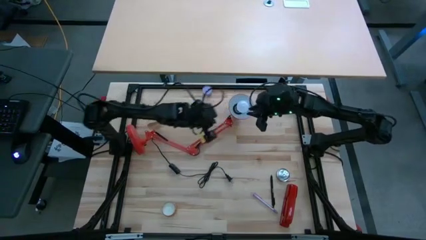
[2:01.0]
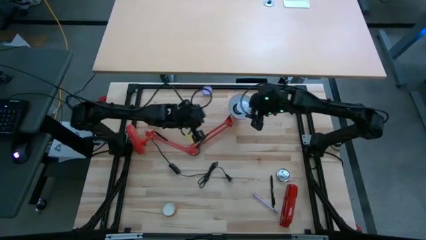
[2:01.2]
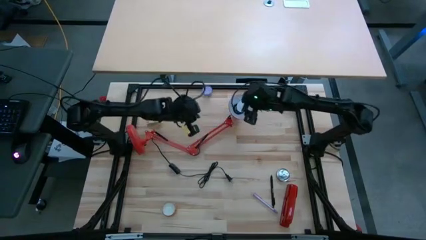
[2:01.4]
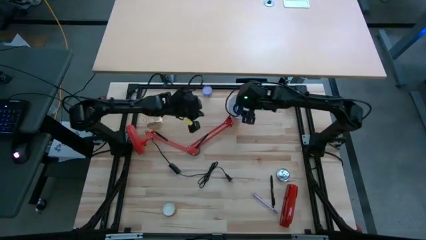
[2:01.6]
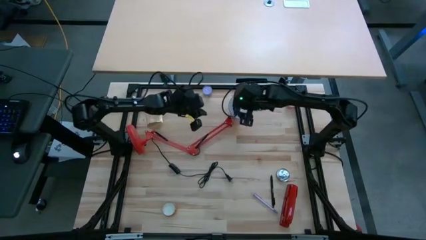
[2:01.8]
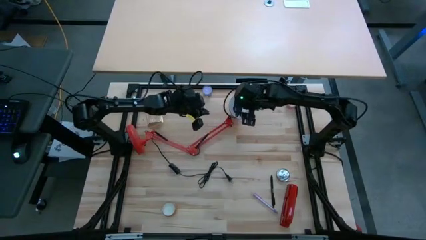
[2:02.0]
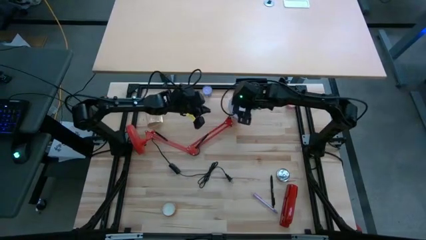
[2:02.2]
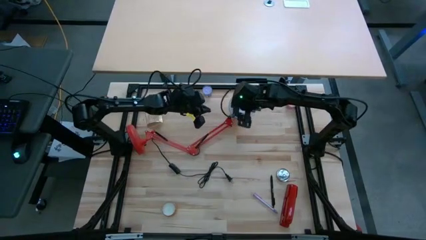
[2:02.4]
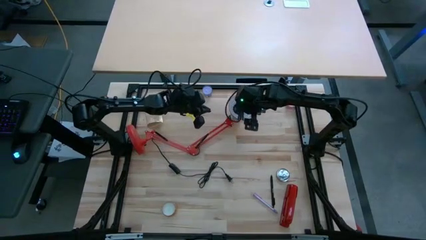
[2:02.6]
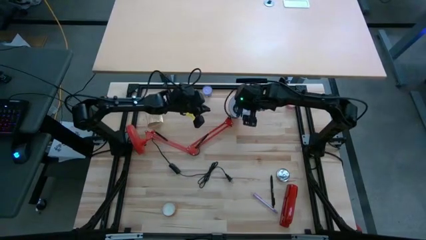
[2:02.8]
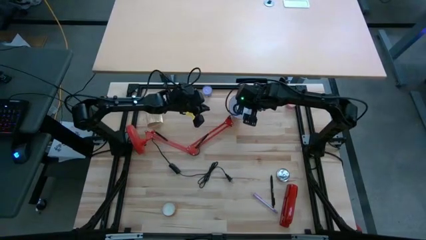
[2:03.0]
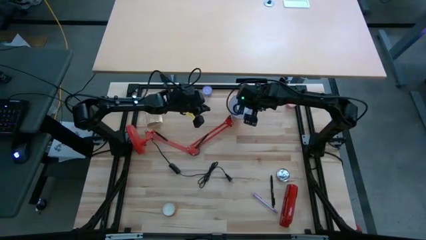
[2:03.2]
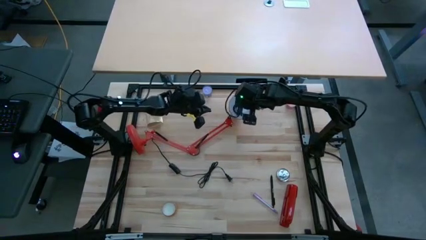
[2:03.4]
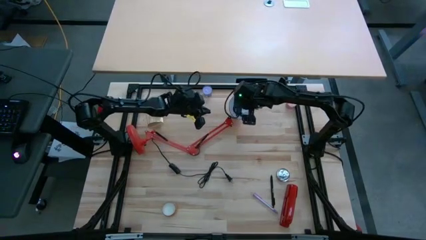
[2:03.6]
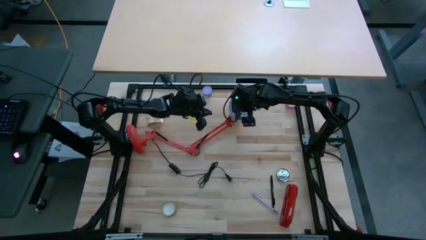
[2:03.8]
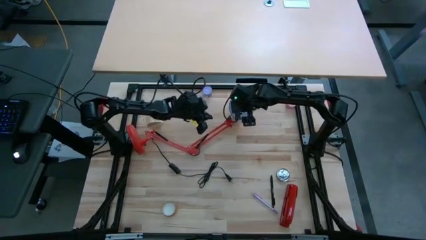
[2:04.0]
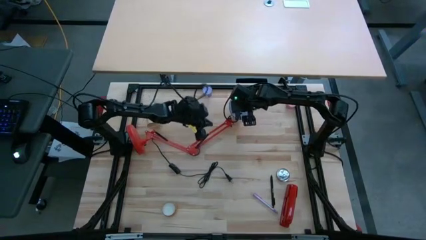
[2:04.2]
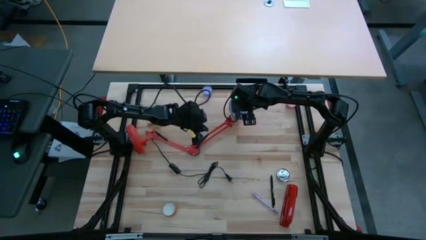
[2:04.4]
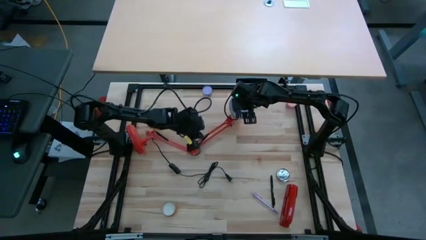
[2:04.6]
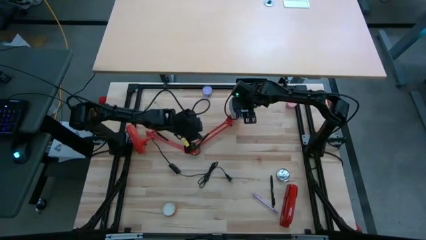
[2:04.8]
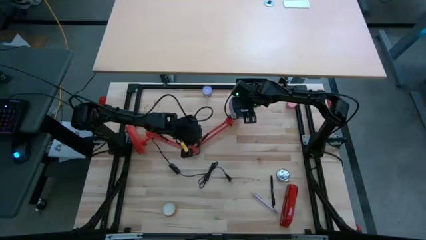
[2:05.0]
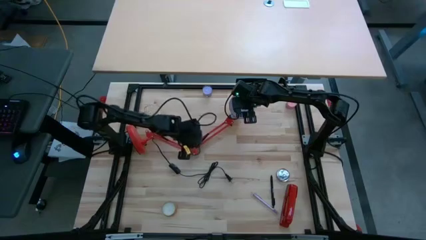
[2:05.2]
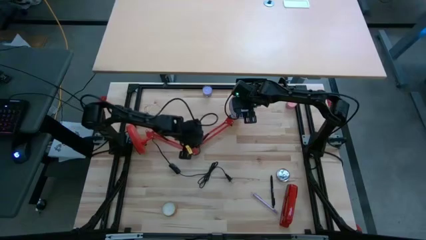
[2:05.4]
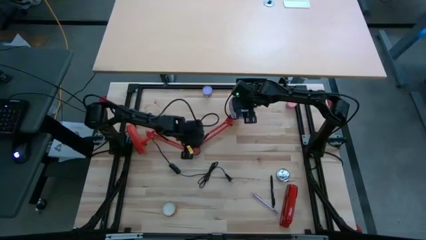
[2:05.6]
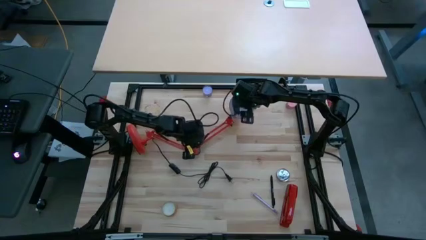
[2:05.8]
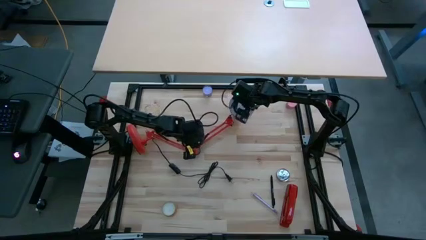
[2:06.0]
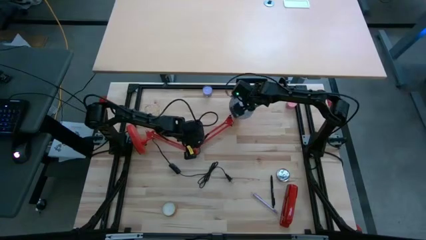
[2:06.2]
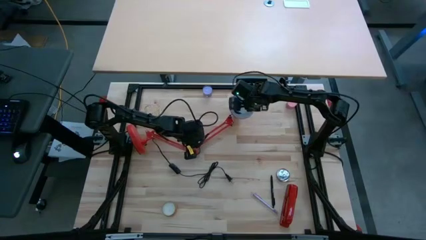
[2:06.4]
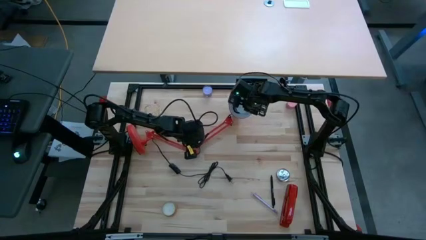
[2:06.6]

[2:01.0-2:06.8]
Task: Screw lightbulb
Remove the white lightbulb from the desk lamp

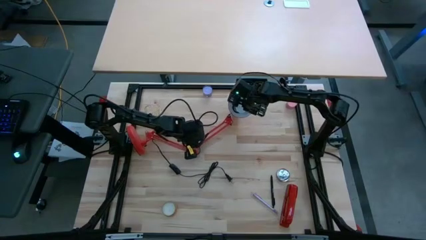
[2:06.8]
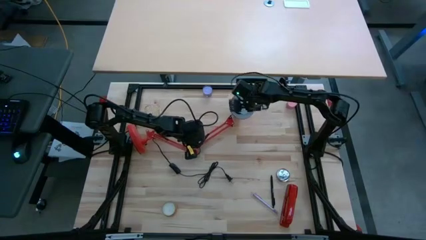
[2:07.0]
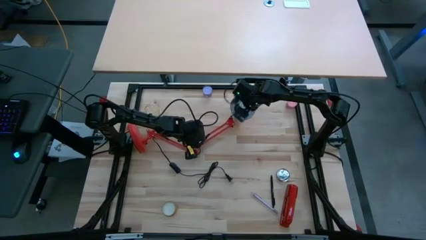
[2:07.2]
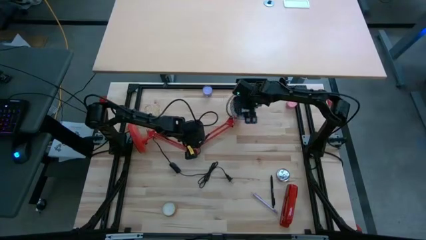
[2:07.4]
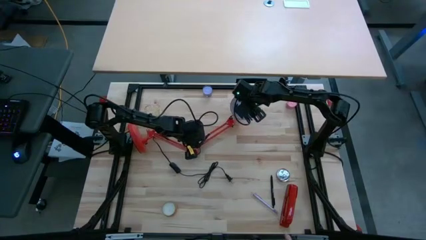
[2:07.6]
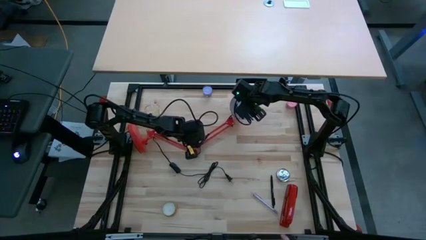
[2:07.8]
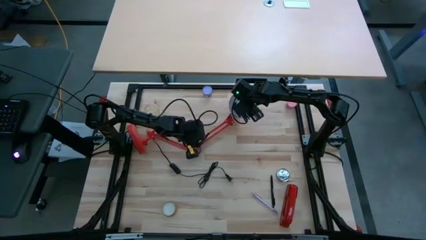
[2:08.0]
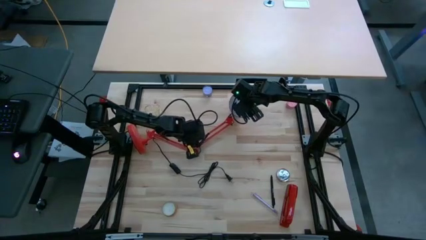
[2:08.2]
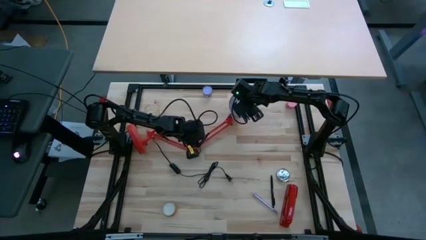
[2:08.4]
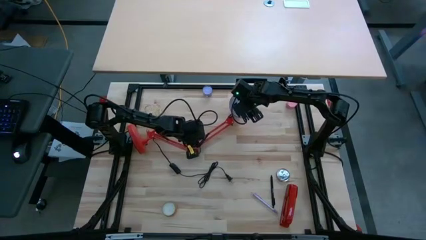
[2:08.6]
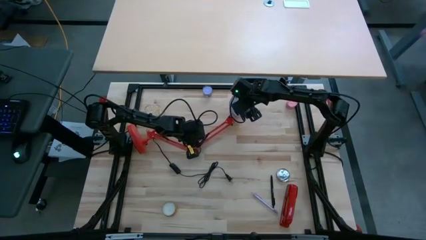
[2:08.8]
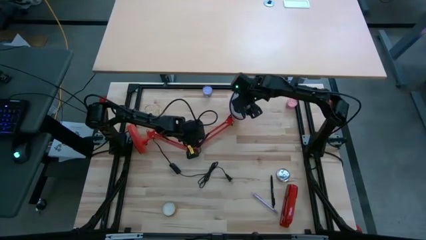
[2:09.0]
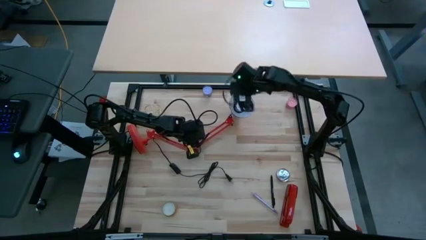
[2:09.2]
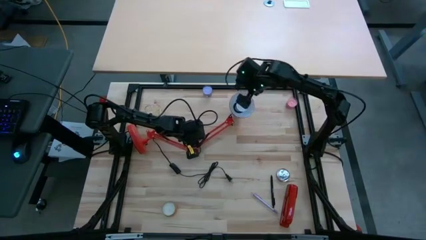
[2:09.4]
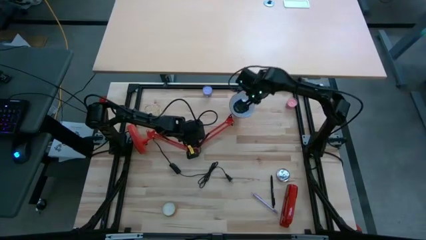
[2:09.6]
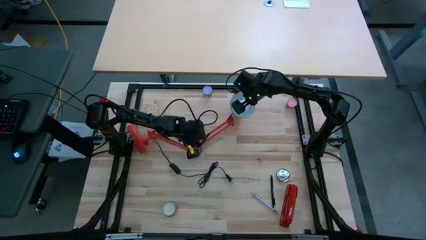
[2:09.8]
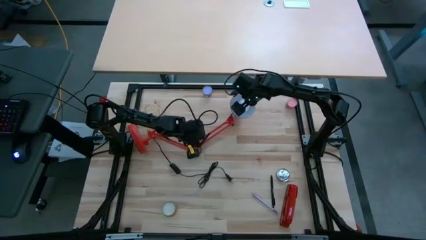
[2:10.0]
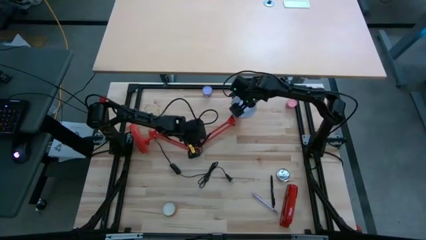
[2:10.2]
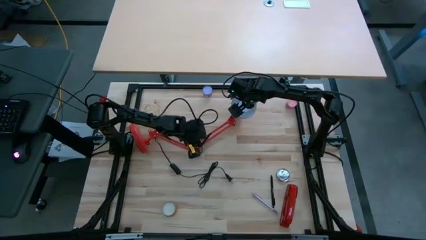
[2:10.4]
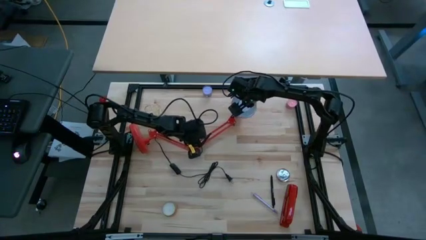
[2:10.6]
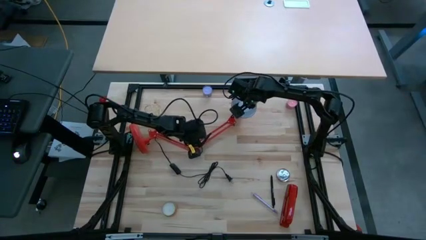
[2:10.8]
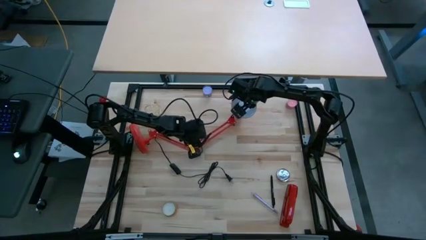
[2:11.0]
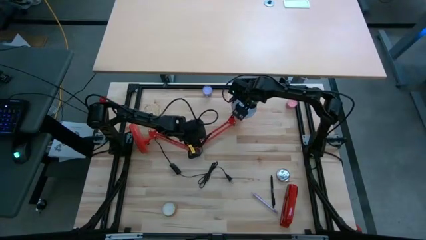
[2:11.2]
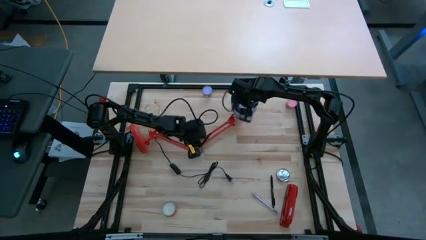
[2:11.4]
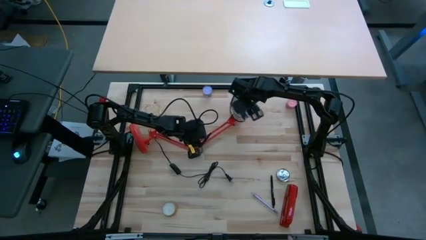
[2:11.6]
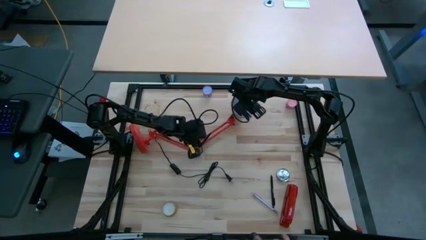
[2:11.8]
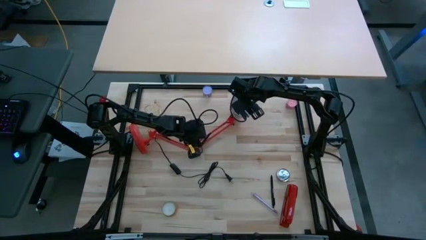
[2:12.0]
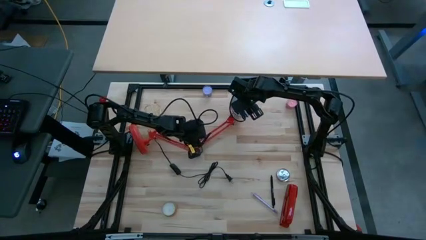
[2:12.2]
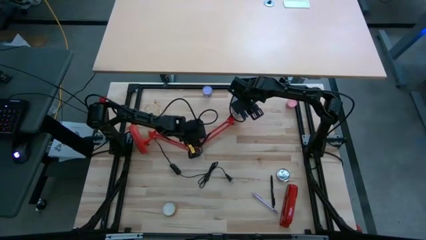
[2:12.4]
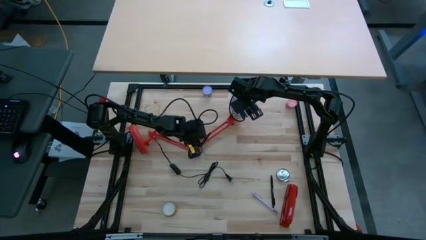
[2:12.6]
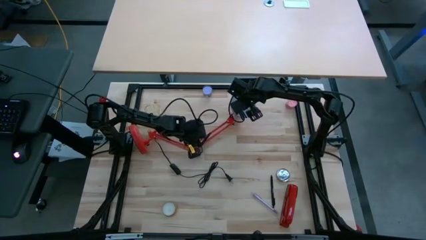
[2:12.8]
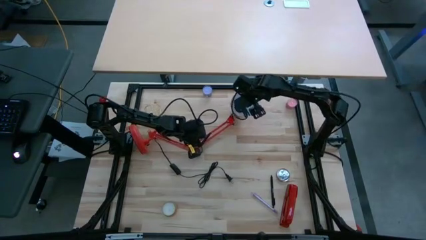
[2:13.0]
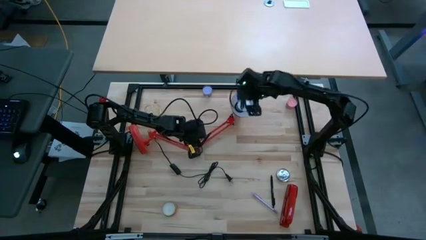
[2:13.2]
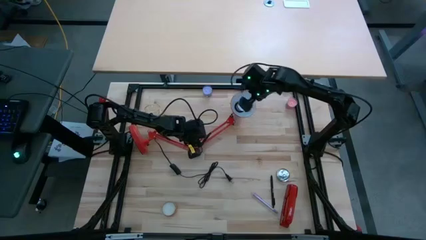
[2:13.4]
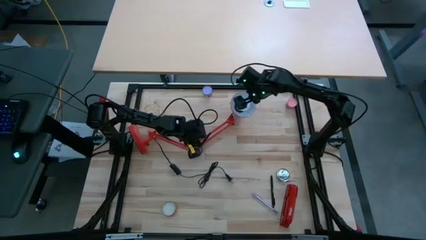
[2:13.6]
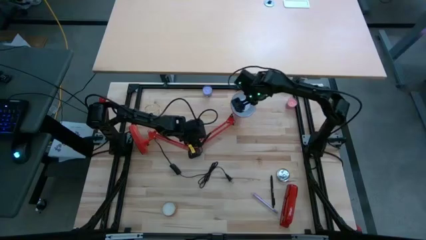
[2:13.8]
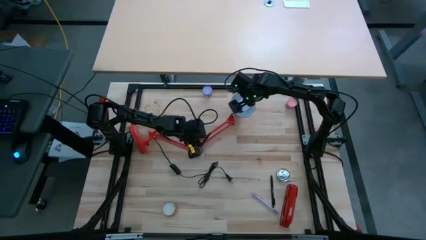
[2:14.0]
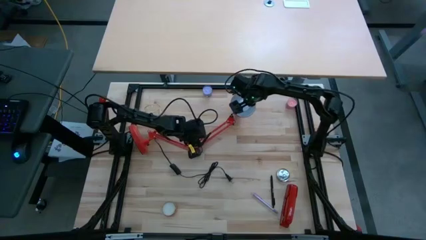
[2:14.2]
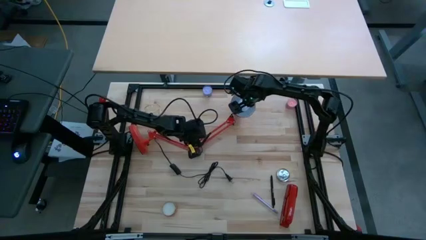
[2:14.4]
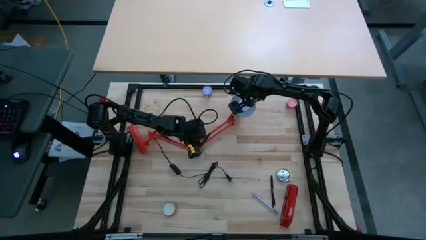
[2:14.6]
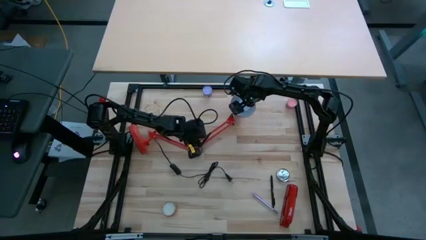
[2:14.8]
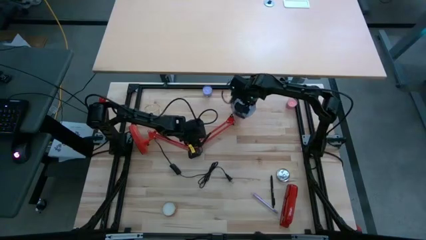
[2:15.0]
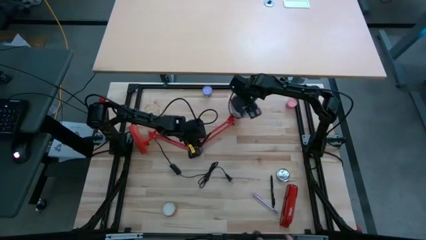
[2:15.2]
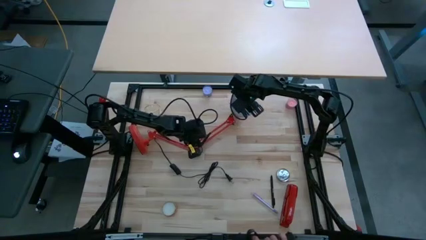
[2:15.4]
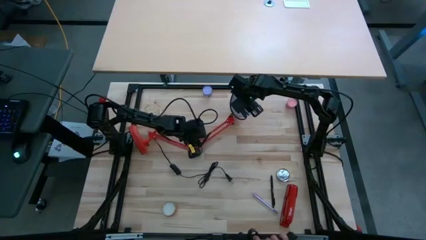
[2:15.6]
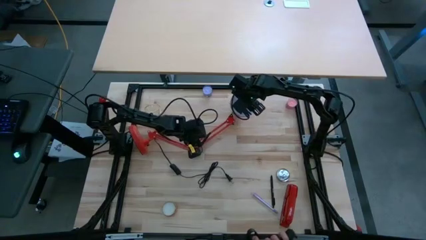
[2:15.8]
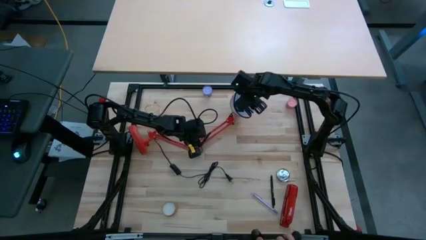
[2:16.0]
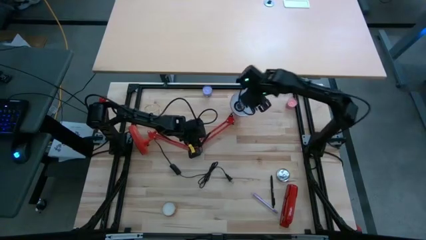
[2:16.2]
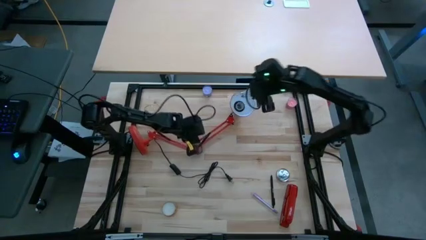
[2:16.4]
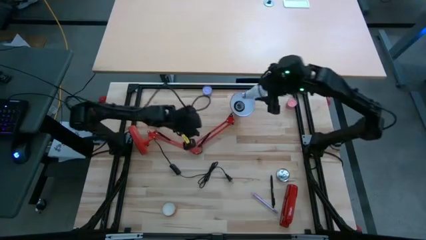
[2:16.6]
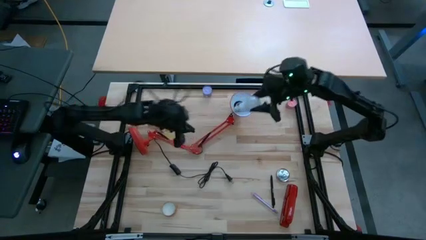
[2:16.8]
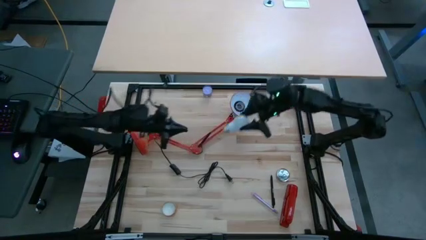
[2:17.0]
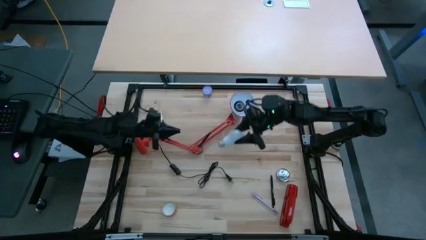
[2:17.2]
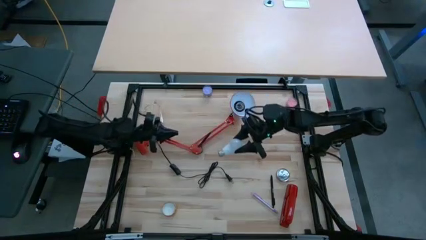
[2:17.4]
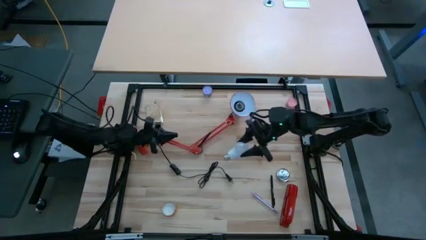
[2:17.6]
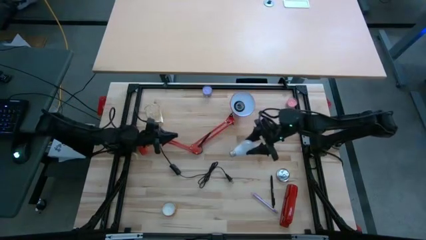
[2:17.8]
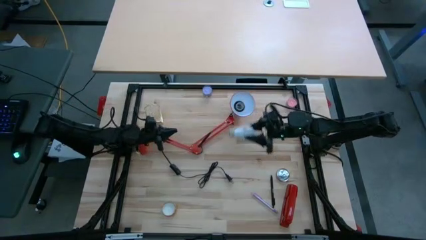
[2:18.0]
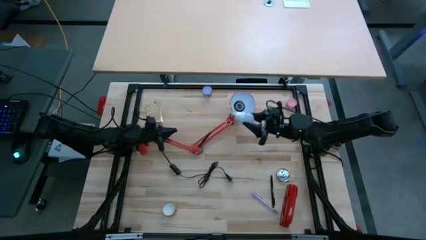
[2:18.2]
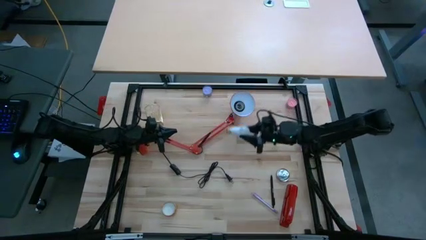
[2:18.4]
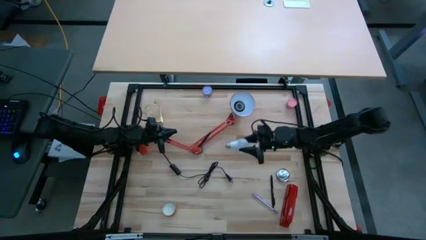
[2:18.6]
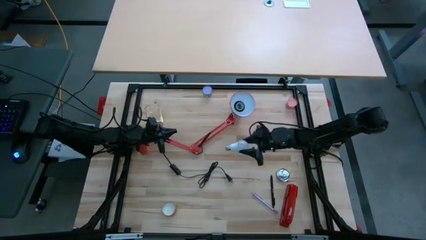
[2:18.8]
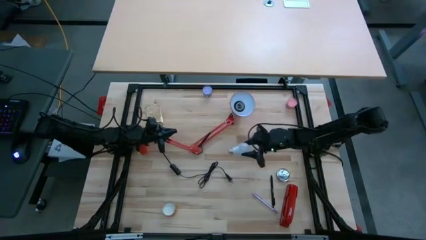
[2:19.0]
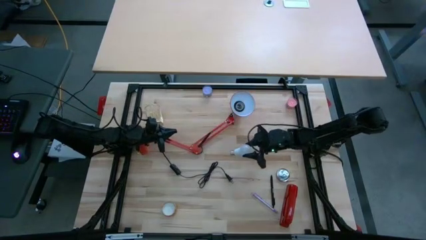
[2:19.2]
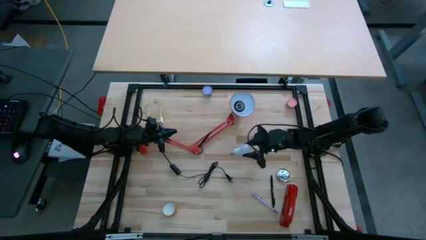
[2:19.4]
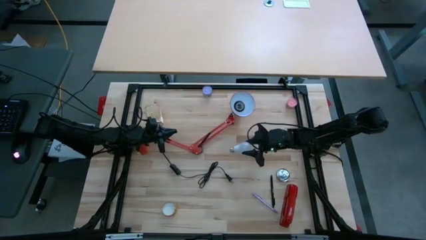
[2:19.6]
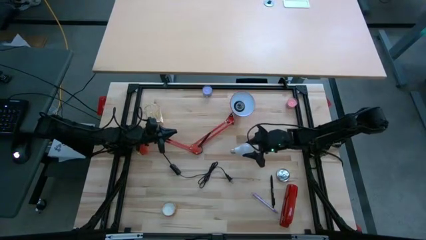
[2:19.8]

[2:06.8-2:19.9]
Remove the white lightbulb from the desk lamp
